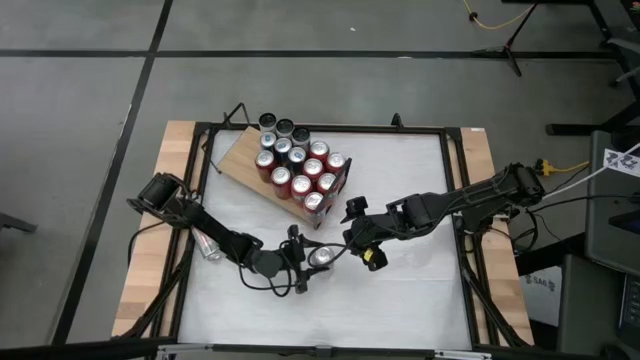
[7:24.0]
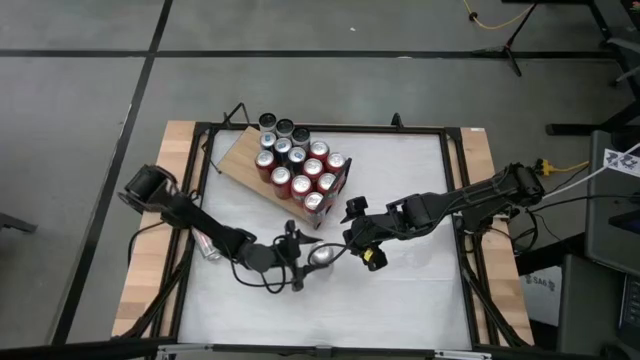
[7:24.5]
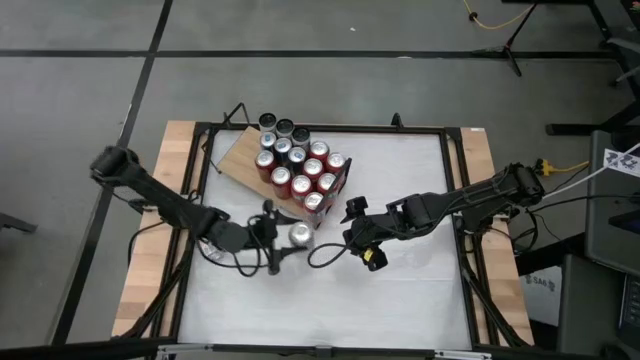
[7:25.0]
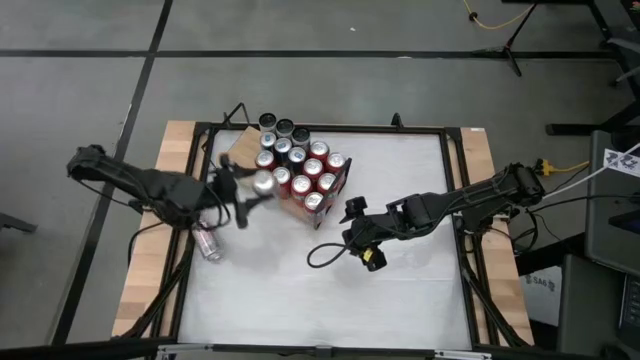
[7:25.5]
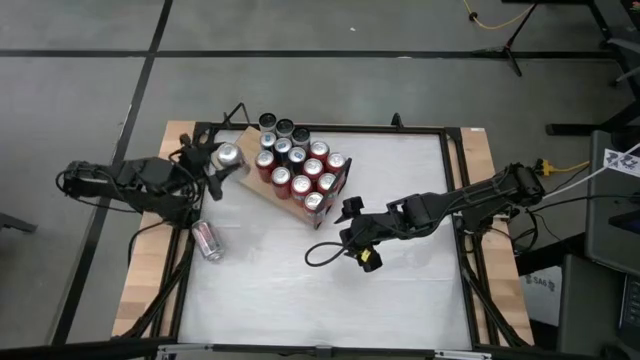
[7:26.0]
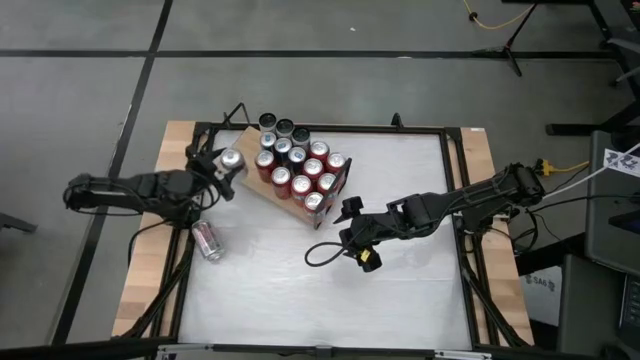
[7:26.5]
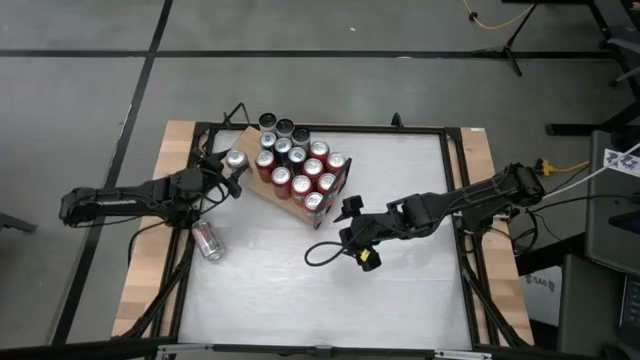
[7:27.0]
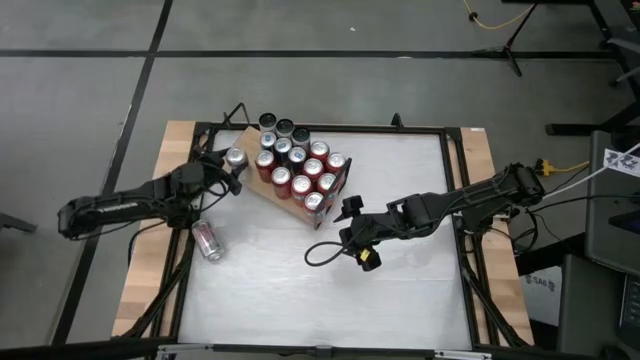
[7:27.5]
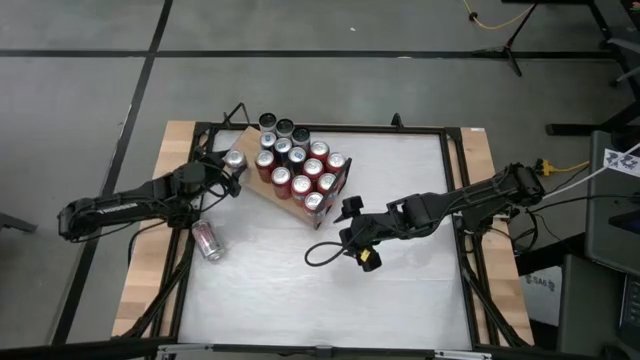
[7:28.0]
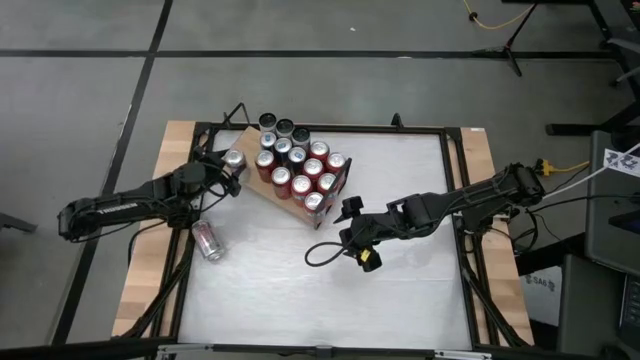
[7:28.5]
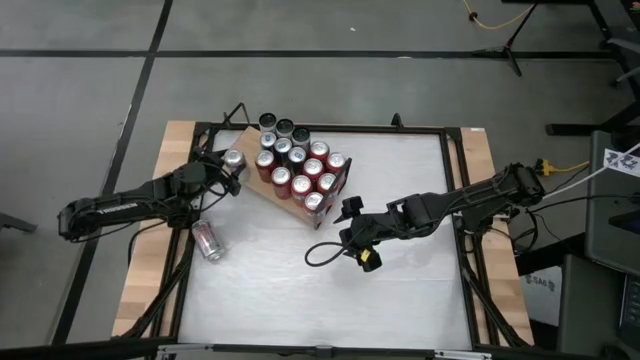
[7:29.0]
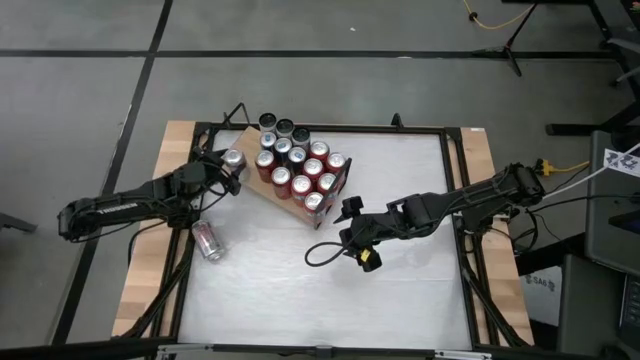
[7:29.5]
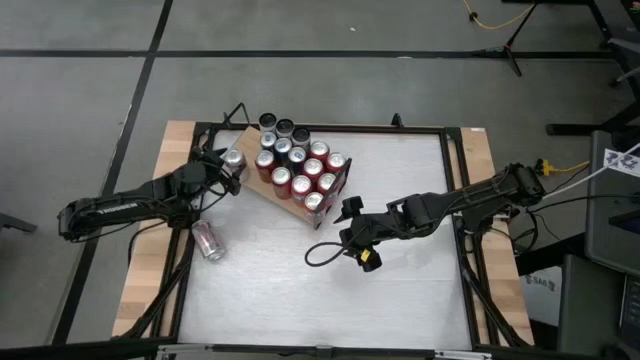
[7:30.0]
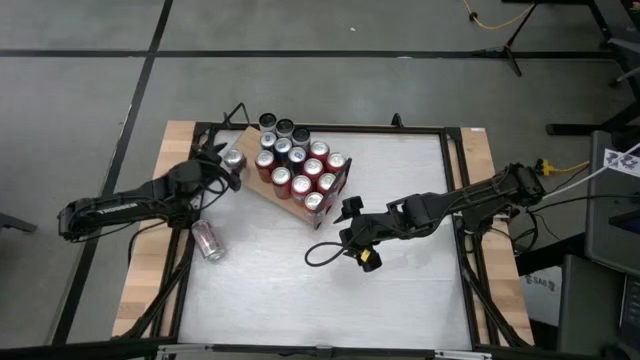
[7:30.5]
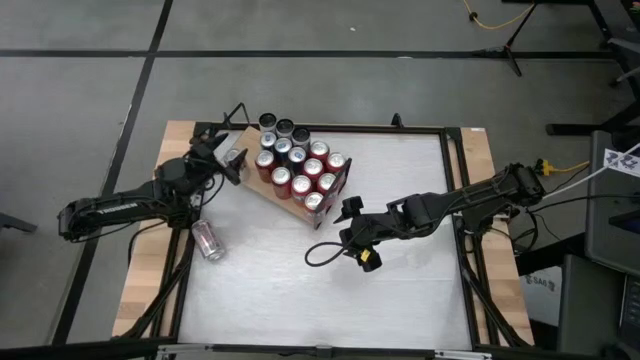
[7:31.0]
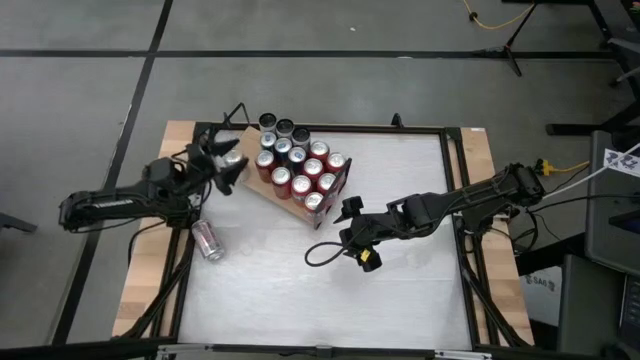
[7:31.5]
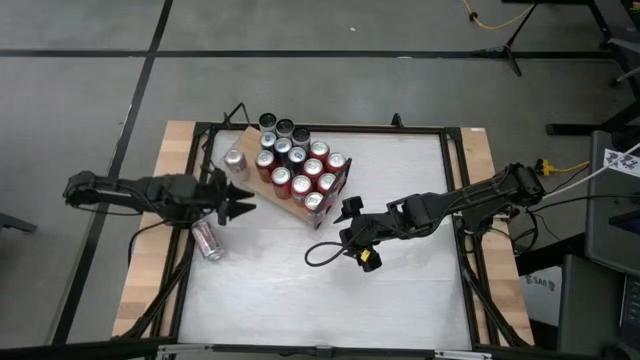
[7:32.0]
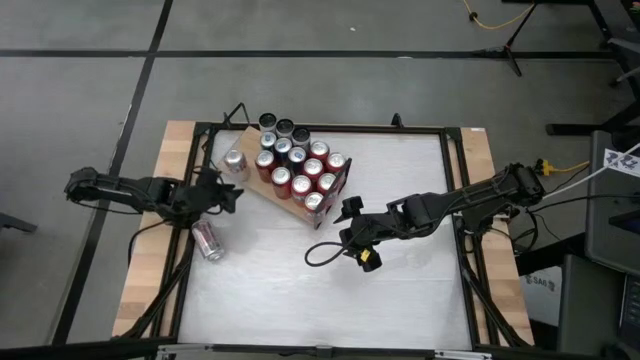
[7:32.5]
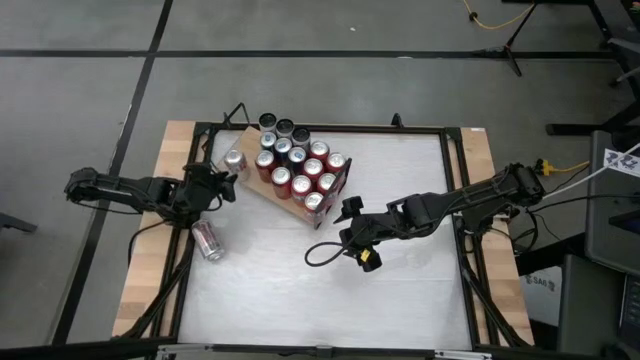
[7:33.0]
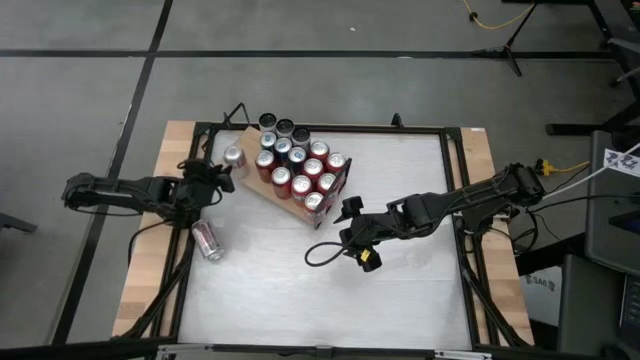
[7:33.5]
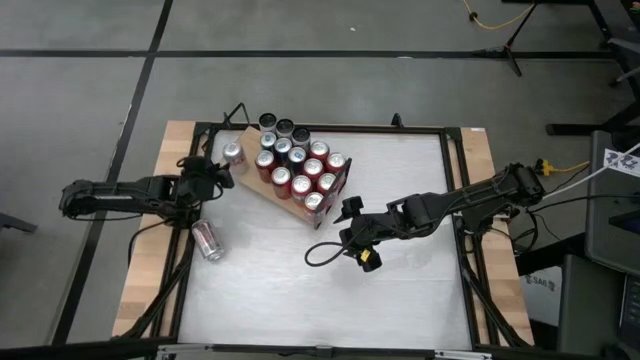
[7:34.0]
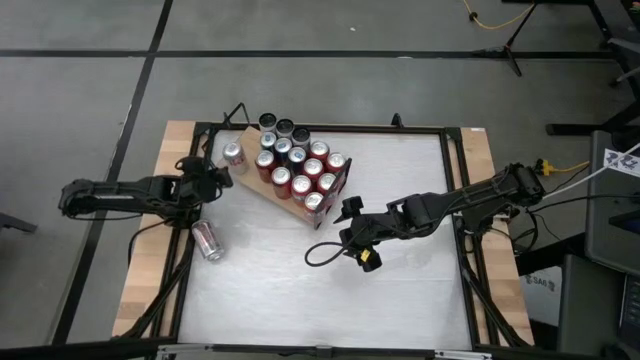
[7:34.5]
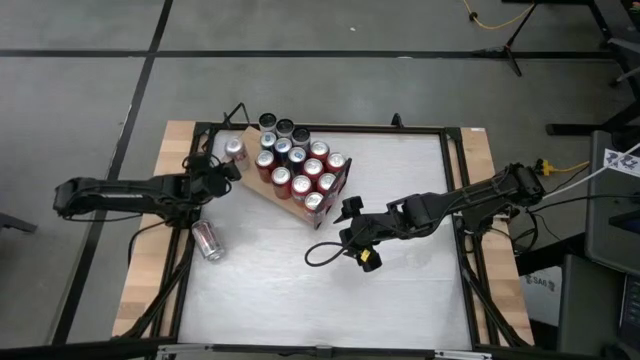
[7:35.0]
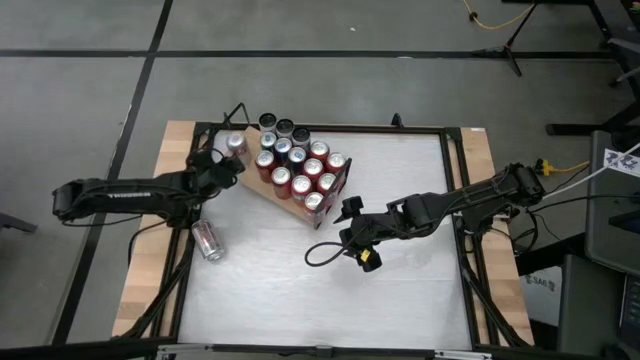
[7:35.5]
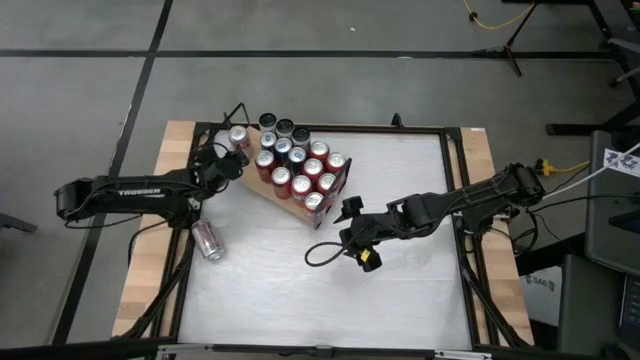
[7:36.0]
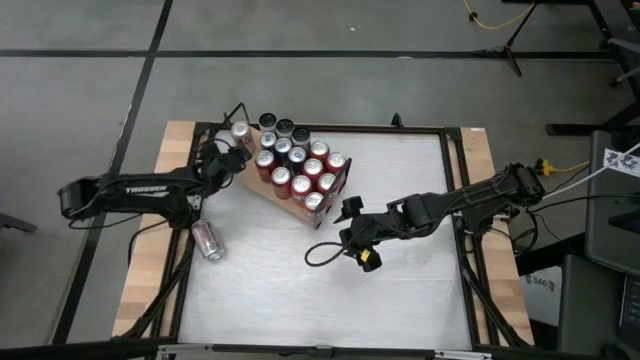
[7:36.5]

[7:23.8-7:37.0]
Task: Pick and place cans onto a shelf
Put the right red/silver soda can on the shelf

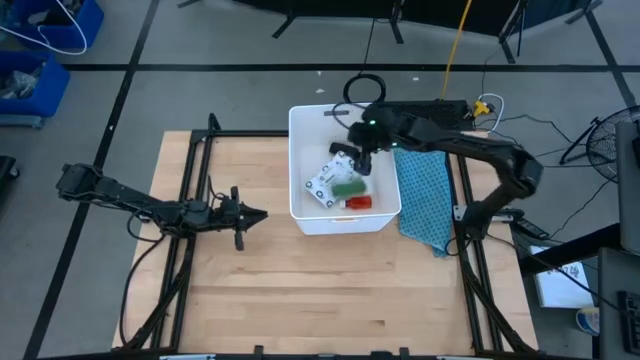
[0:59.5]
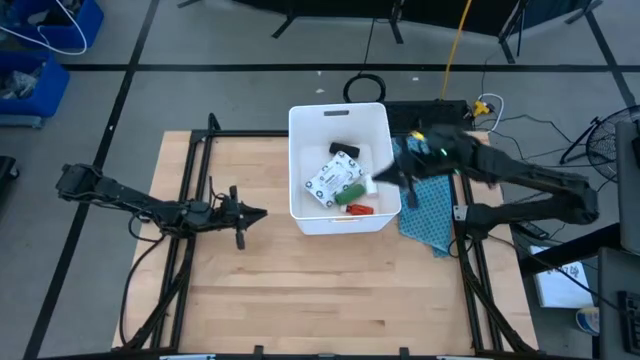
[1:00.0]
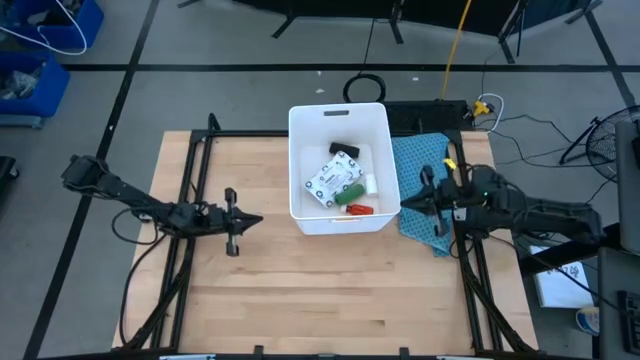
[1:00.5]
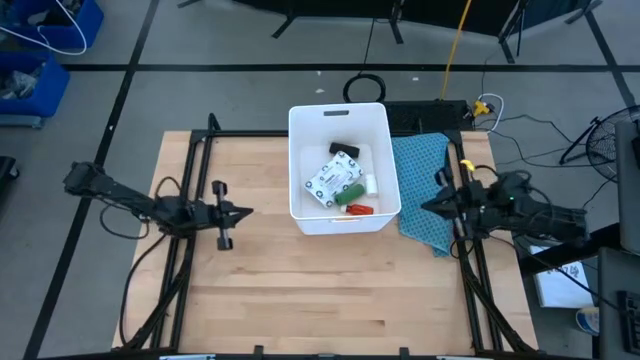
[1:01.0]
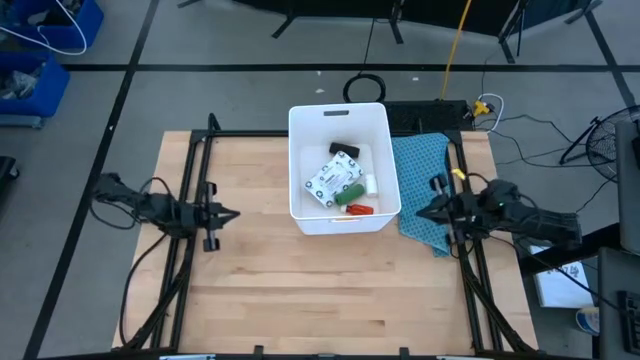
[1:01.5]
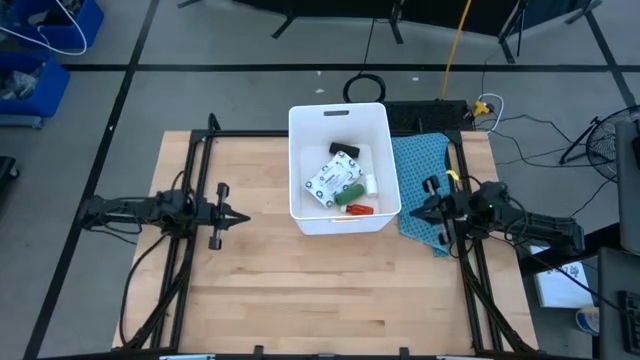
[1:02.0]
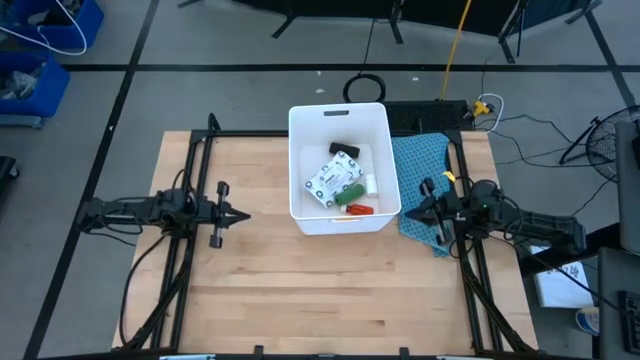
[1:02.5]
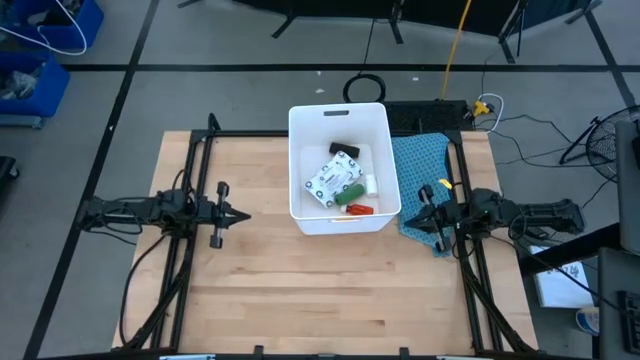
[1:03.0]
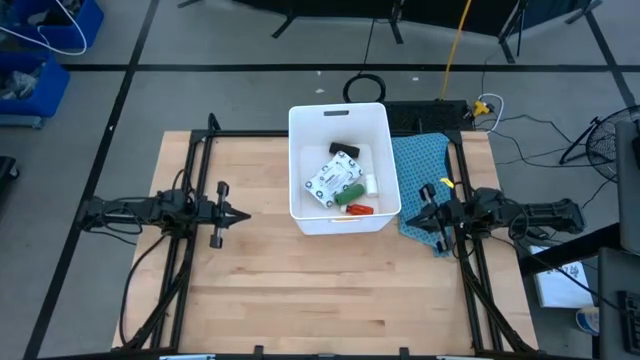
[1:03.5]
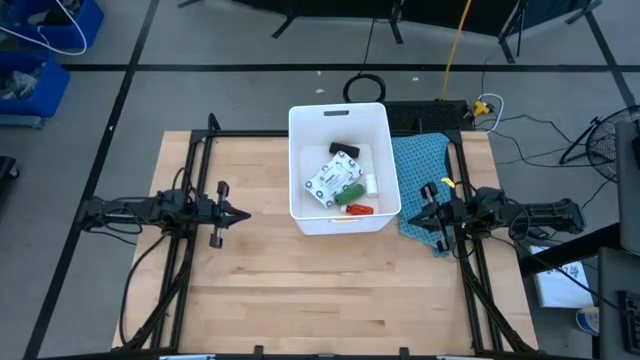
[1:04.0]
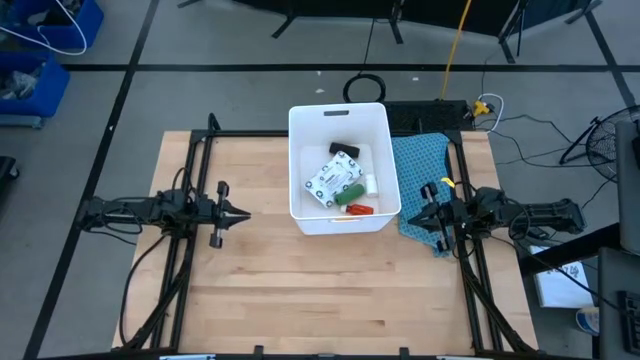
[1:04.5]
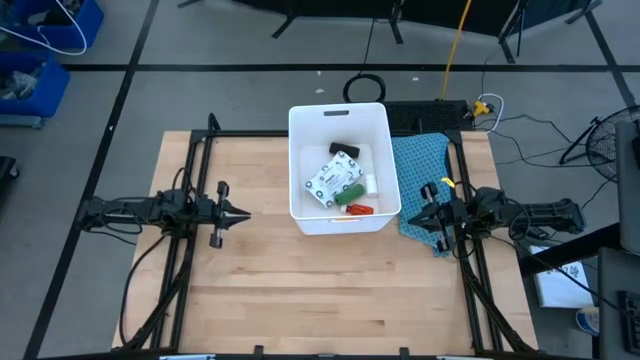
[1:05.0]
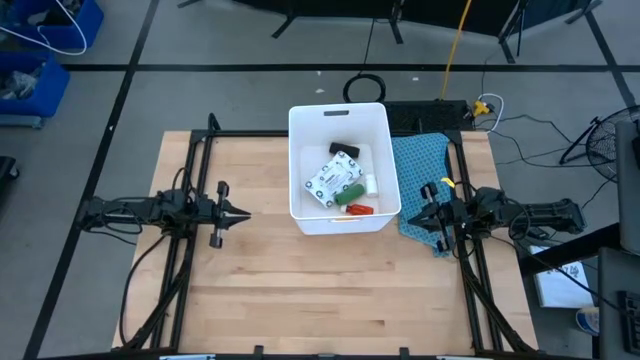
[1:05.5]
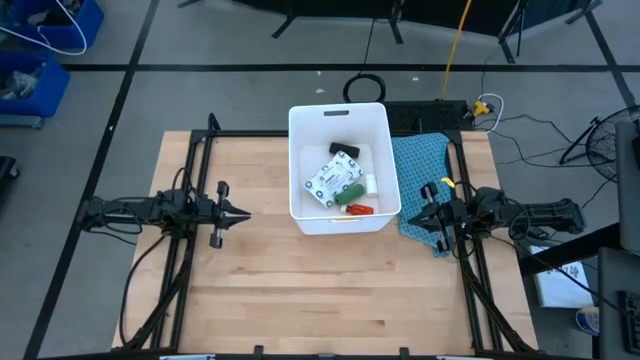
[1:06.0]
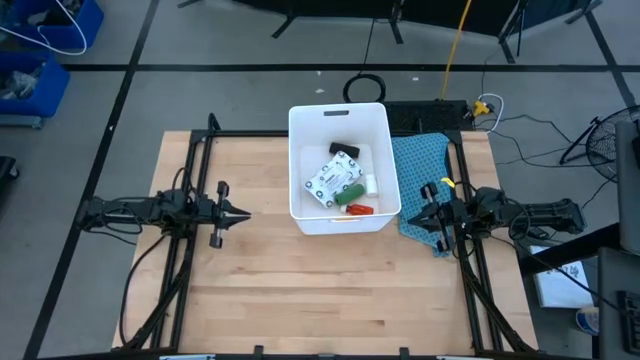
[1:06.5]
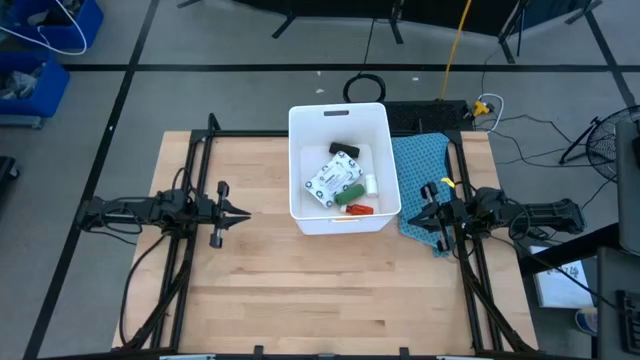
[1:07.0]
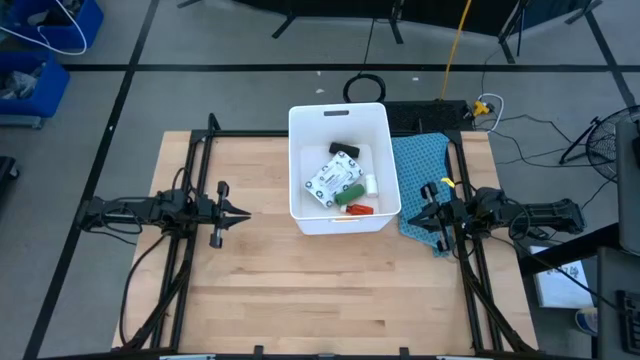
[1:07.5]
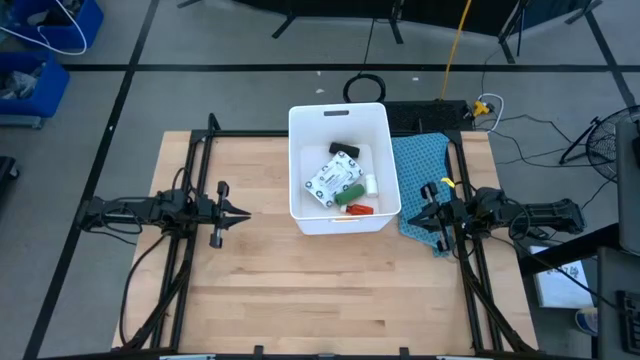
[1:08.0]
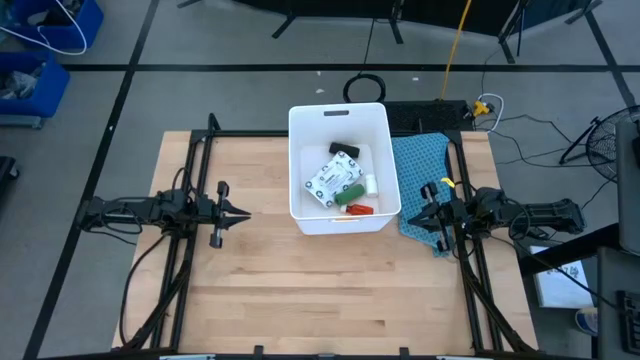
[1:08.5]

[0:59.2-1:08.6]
Task: Pick & place medical supplies in basket/bin
Return to Home Position
